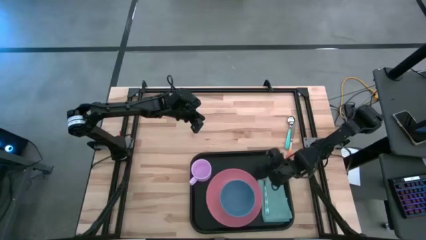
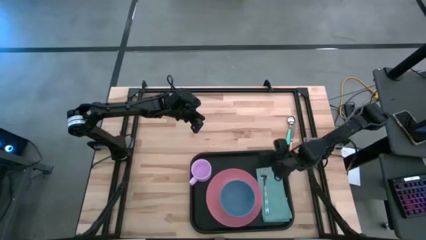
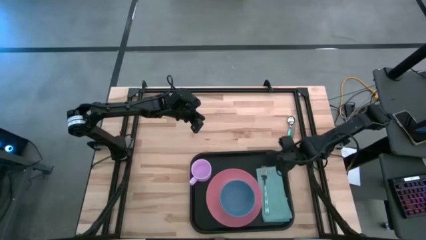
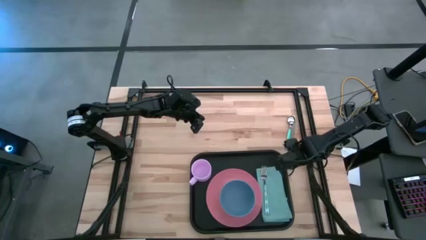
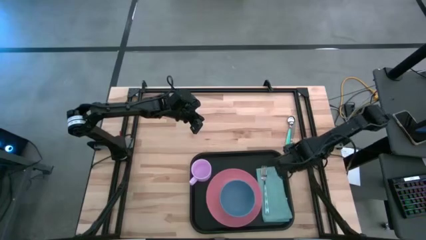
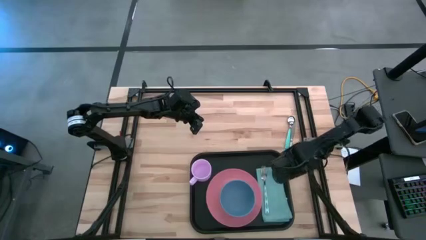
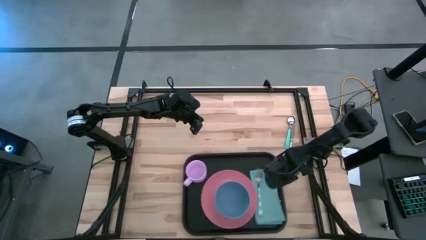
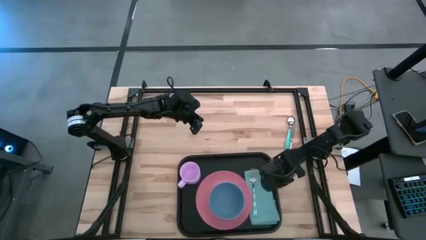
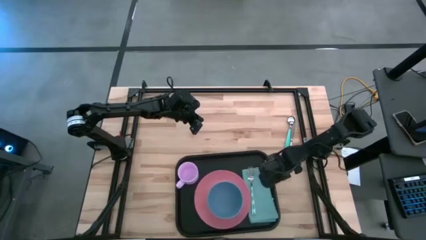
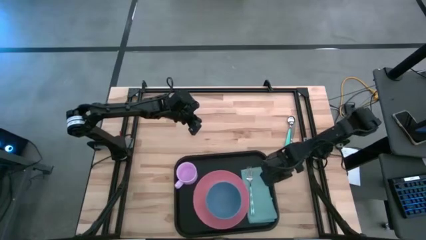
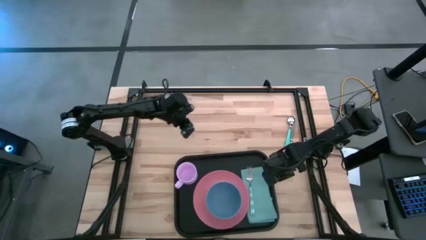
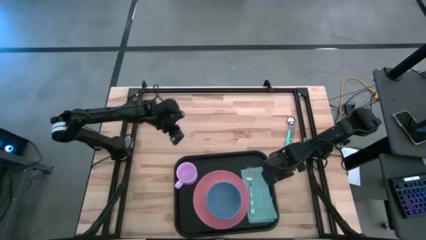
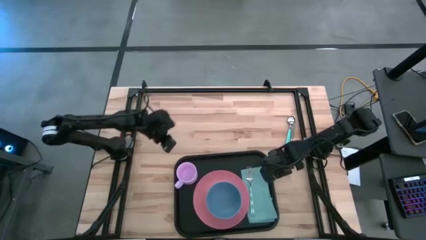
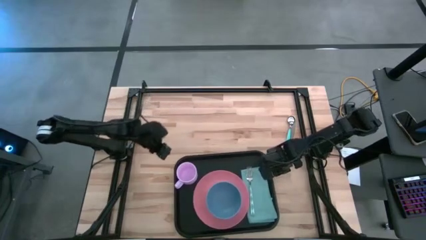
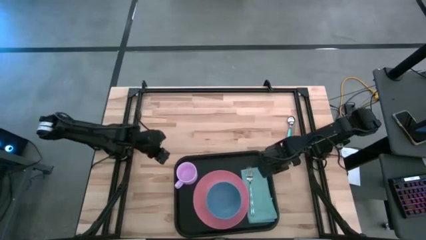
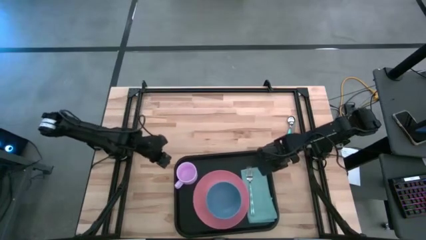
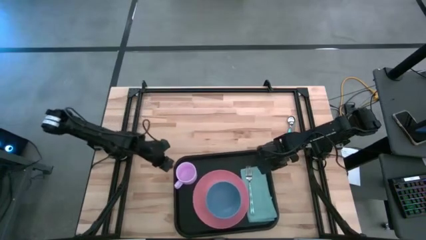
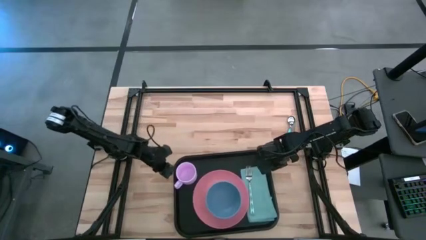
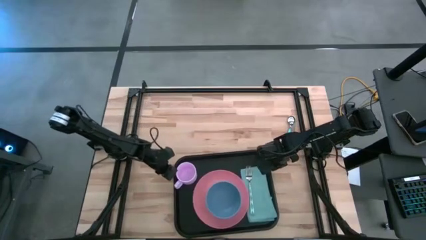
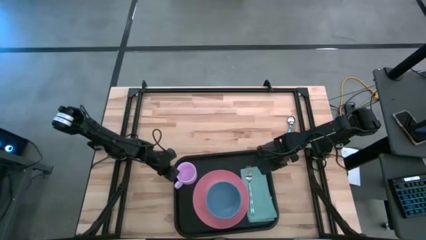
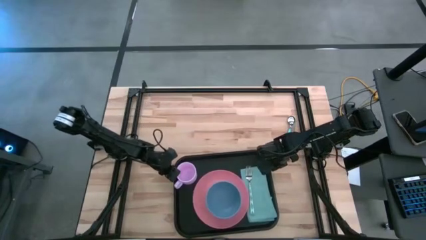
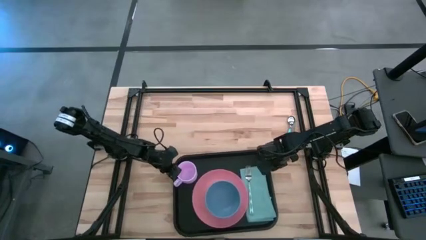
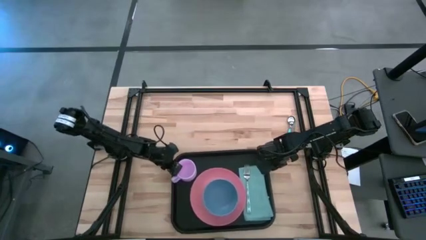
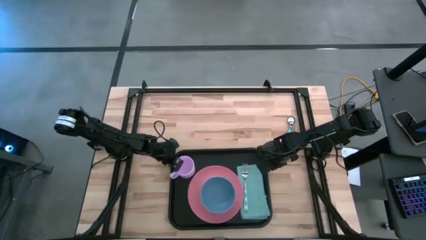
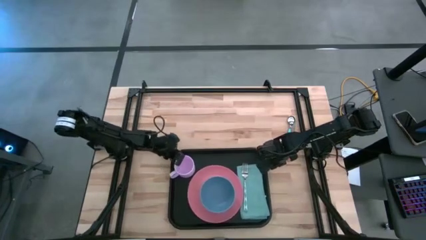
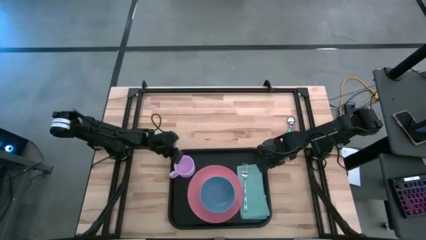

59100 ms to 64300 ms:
Task: Set up tray
Adjust the black serving tray

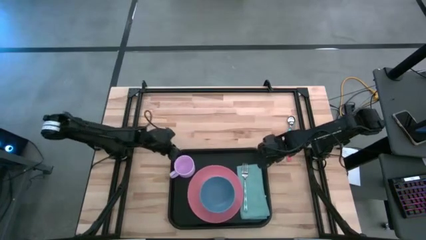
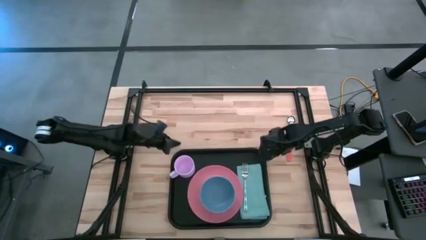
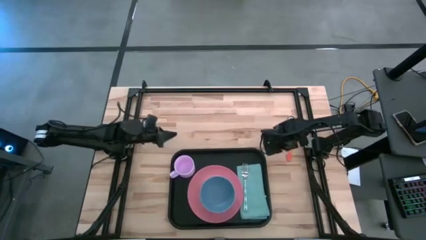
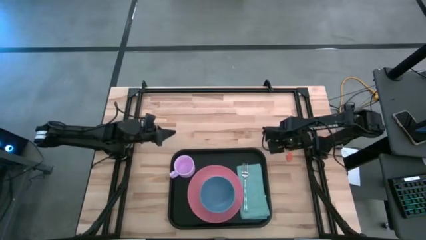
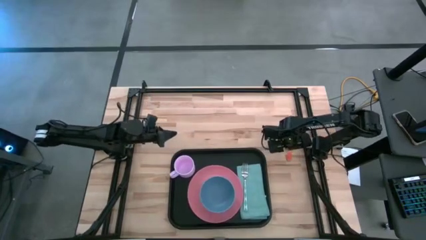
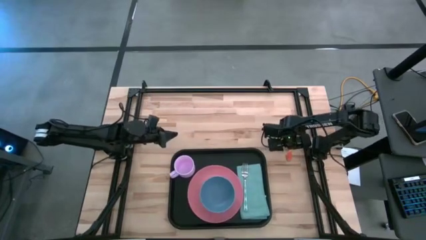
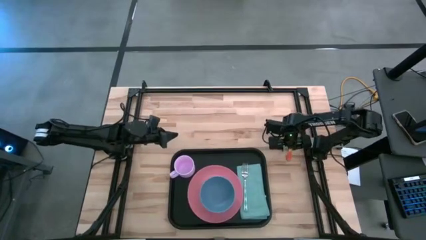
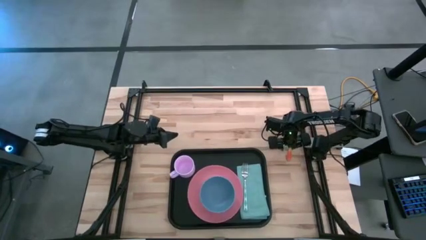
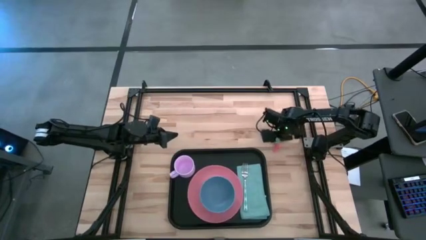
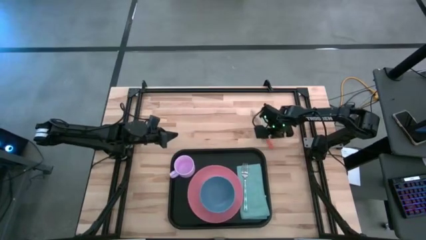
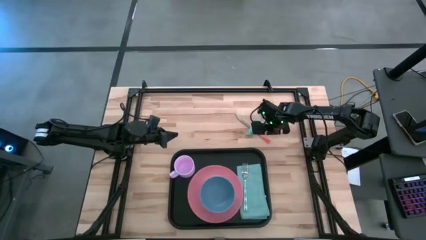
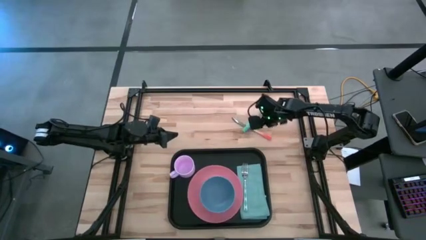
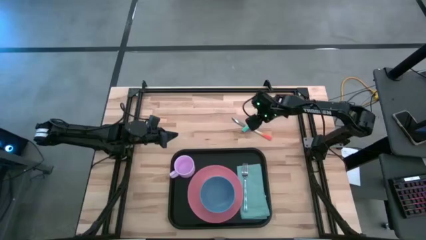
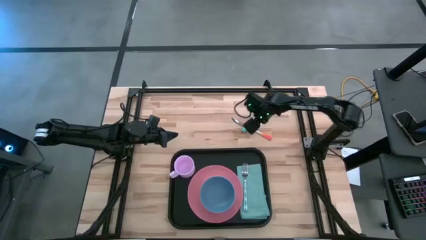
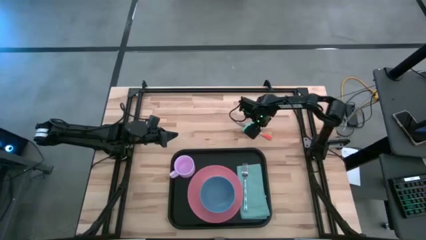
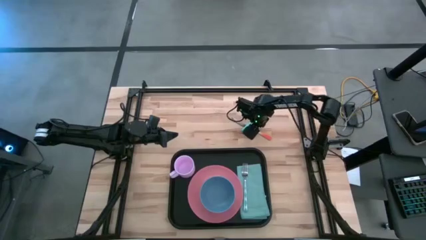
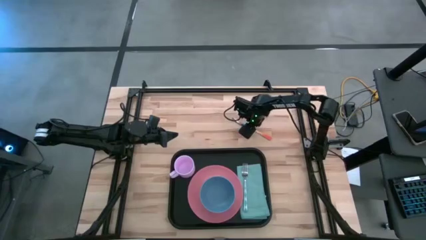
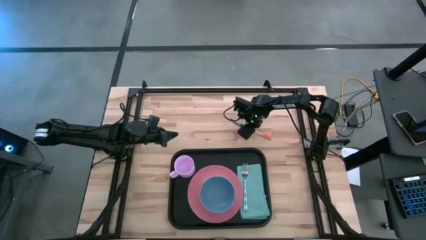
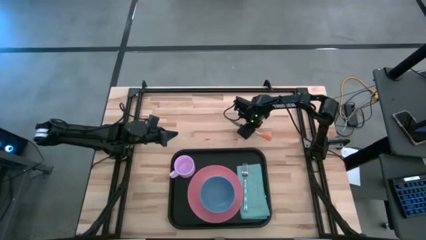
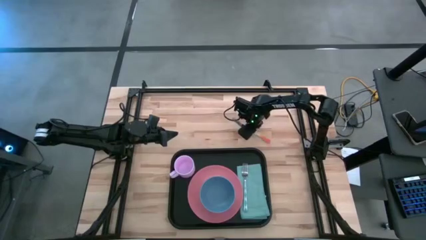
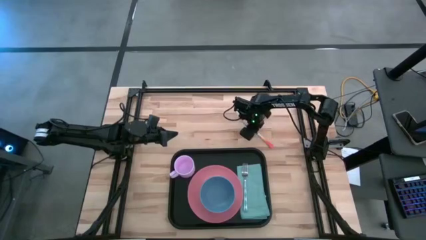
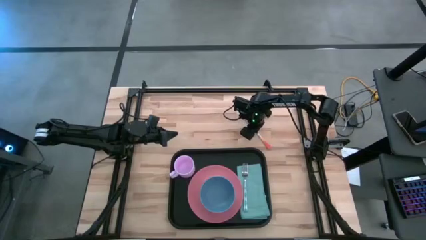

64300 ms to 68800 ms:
Put the orange knife on the blue napkin to the right of the white patterned fork

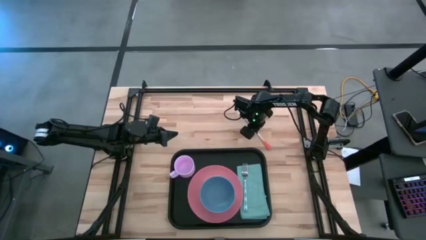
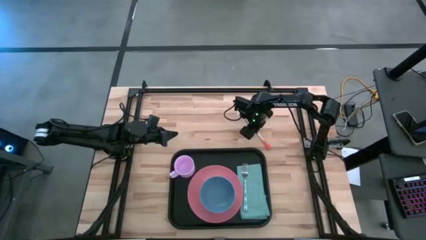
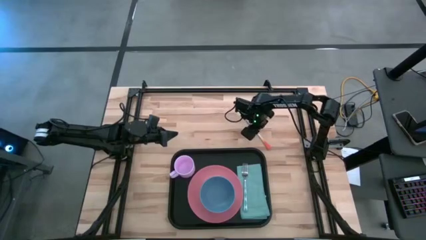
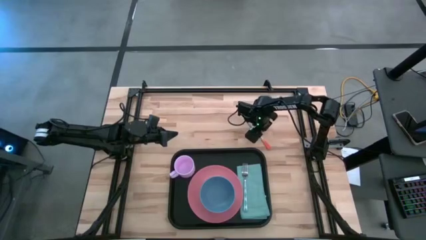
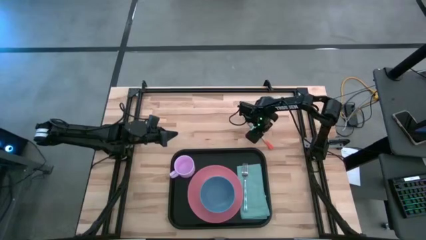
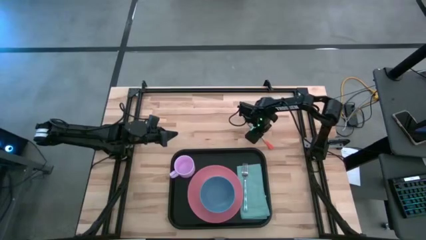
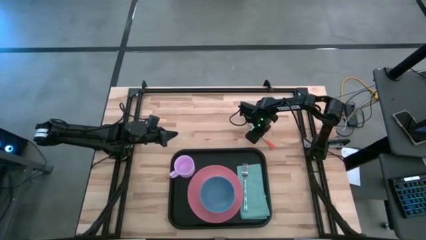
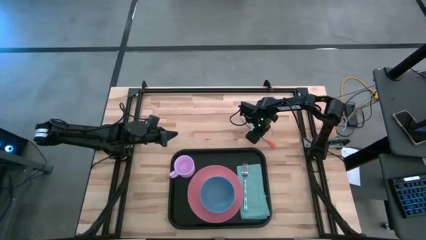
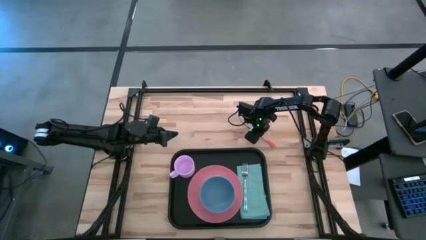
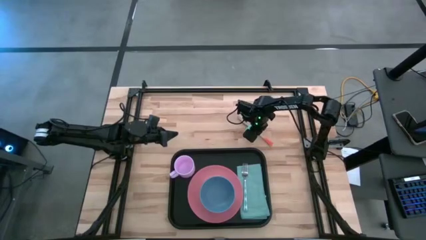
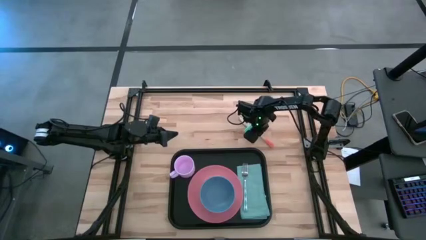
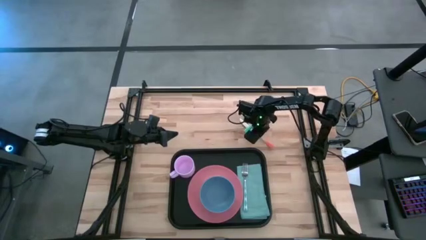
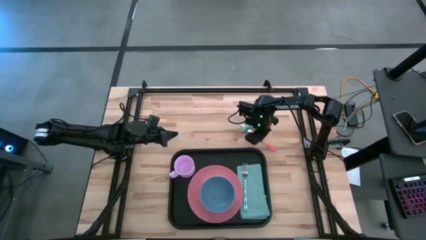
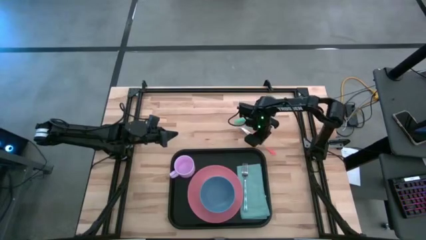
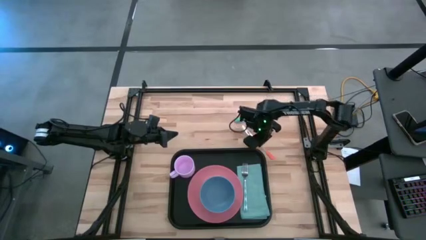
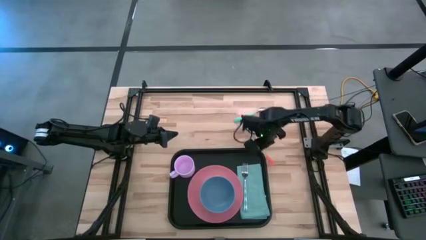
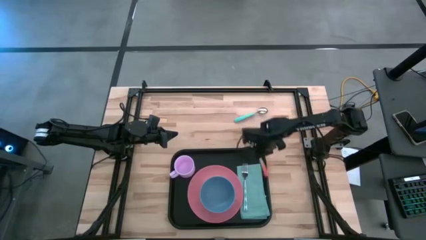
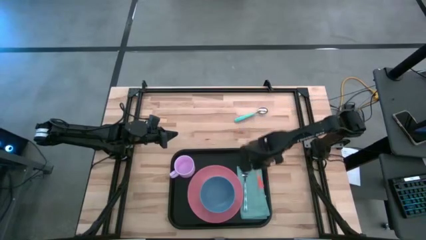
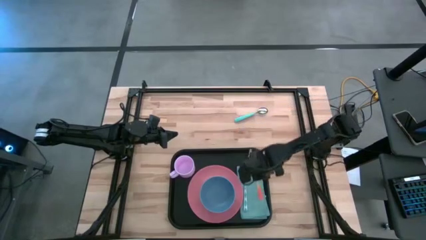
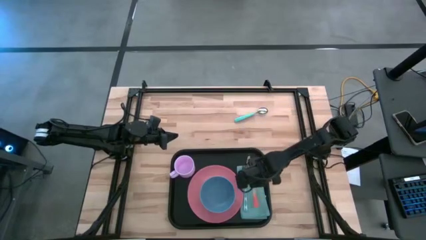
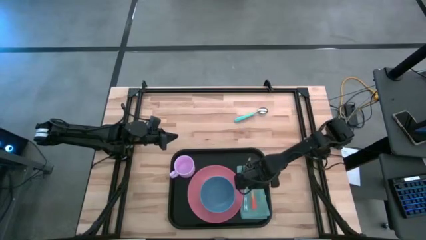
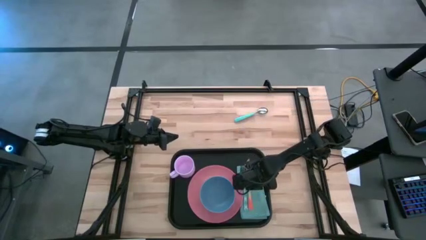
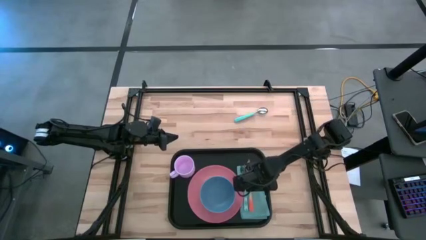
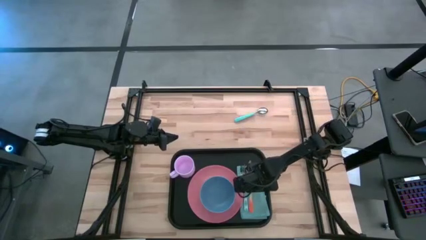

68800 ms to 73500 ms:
Put the orange knife on the blue napkin to the right of the white patterned fork
